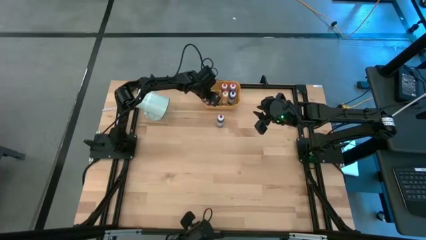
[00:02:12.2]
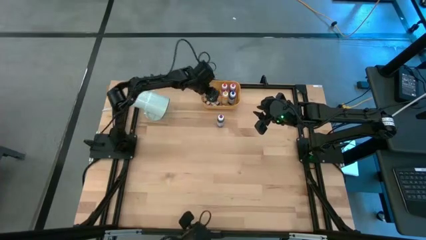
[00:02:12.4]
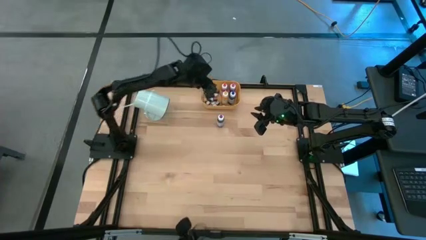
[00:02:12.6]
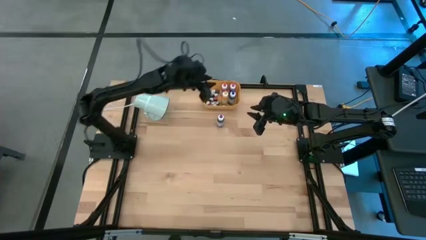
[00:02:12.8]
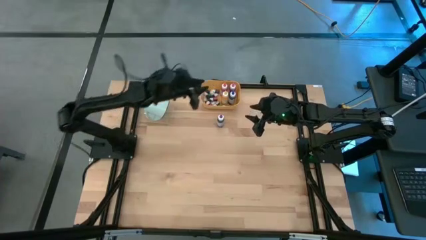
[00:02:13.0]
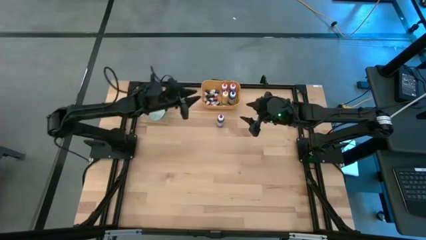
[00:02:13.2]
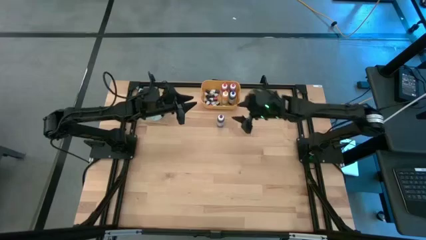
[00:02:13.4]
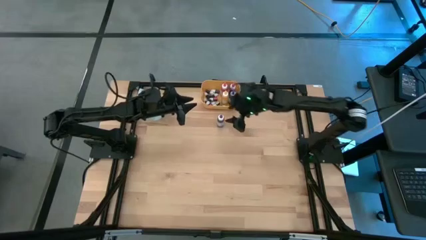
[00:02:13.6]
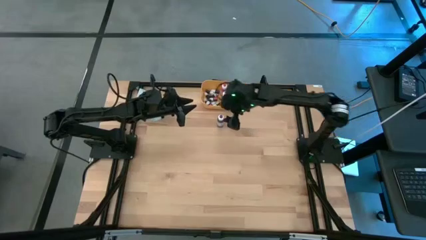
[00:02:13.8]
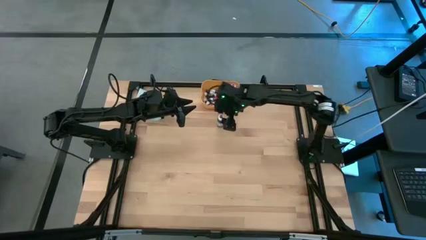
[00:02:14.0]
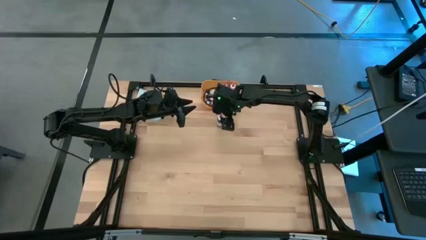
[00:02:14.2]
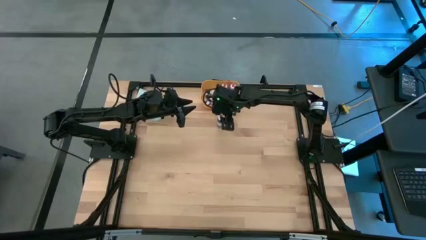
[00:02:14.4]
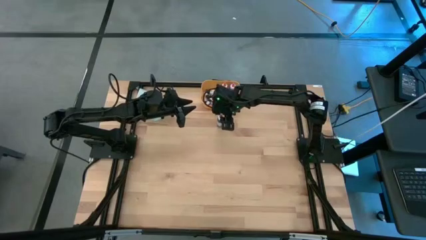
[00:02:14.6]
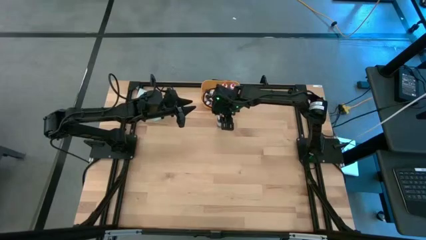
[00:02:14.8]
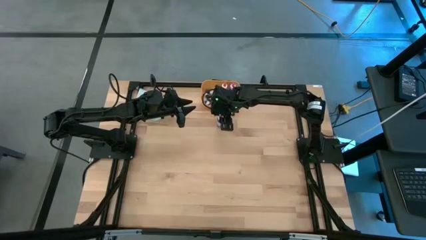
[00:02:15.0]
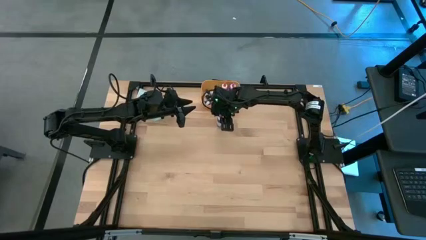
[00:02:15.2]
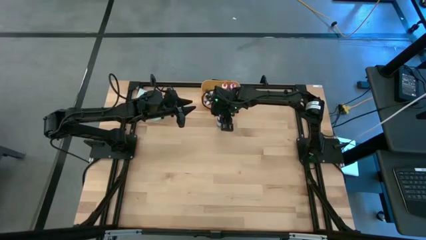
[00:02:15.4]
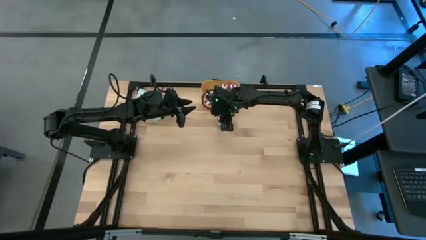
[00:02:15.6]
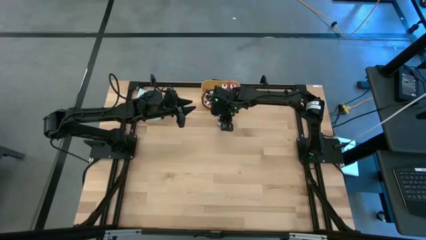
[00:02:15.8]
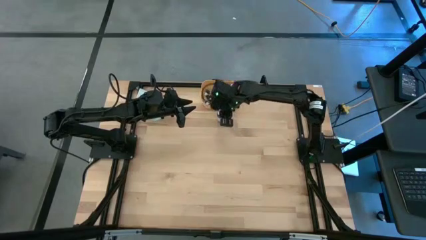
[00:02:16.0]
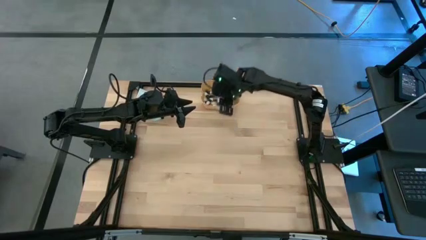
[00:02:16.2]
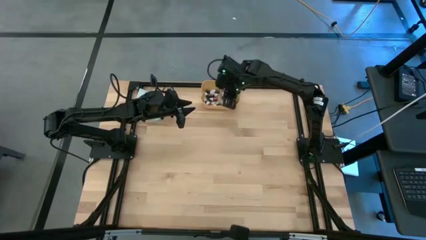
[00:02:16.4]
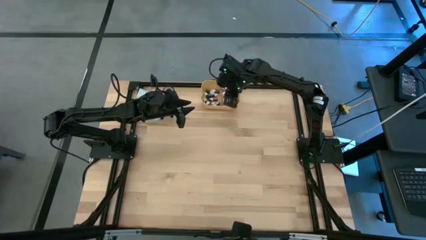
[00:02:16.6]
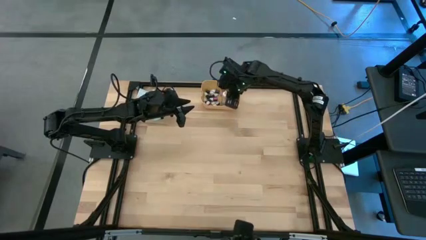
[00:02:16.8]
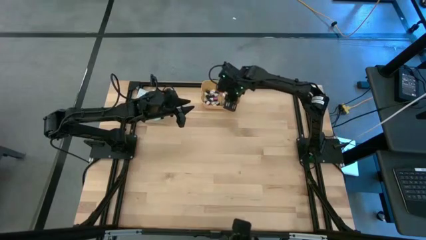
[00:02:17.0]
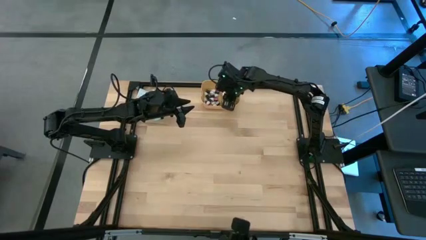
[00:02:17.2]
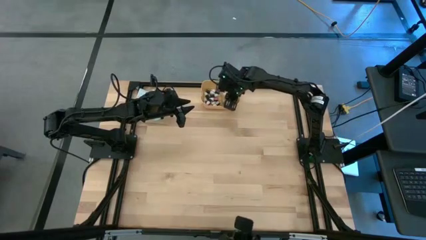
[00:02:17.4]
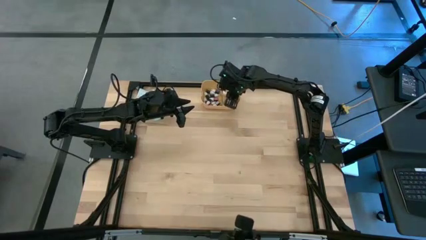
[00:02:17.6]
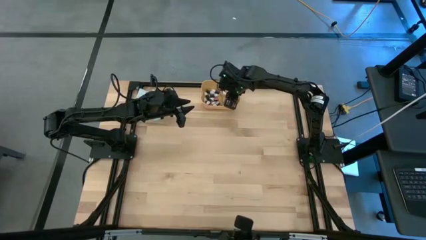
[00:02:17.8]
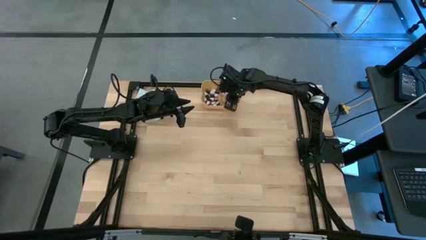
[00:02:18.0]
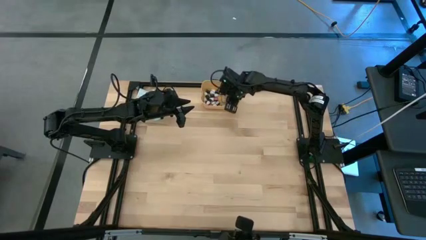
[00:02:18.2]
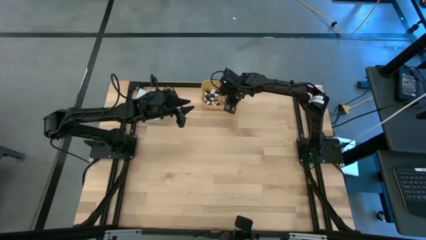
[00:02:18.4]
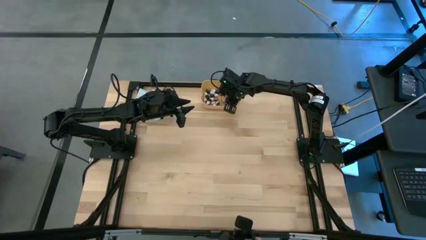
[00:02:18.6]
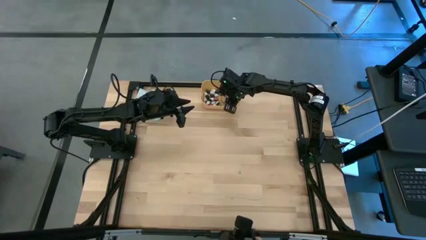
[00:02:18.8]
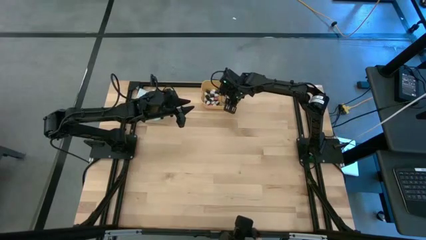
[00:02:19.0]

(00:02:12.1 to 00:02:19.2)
Task: Pick & Place food coloring
Put the violet food coloring bottle into the yellow bin

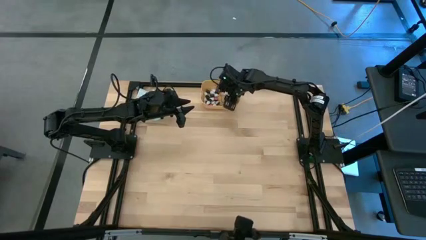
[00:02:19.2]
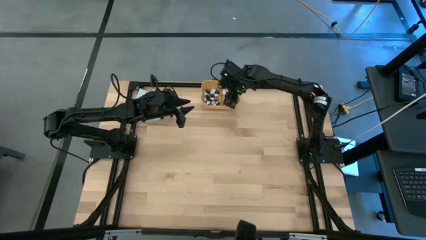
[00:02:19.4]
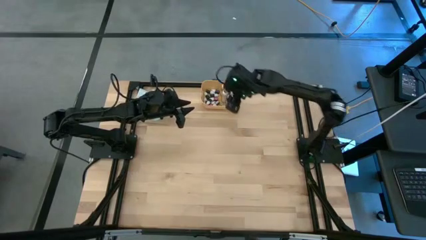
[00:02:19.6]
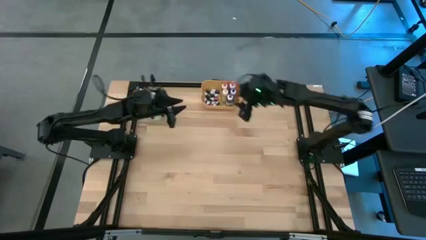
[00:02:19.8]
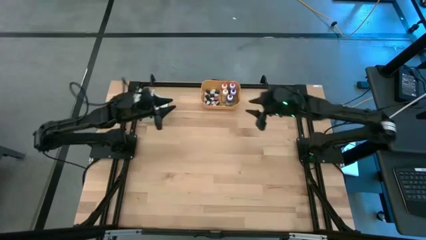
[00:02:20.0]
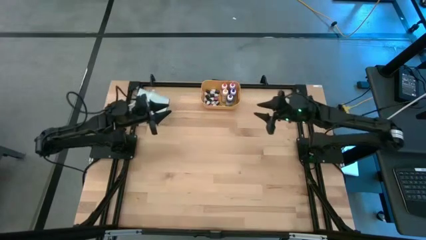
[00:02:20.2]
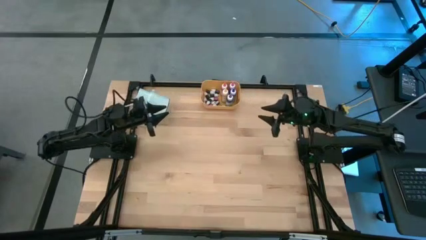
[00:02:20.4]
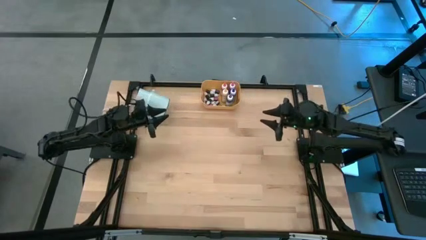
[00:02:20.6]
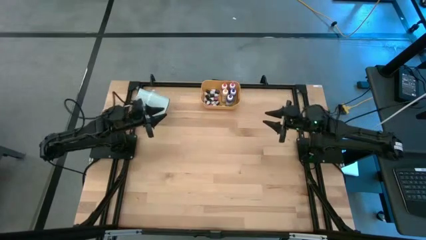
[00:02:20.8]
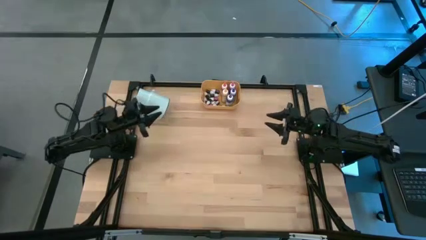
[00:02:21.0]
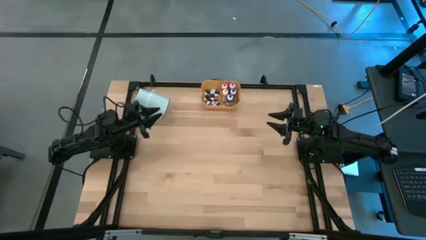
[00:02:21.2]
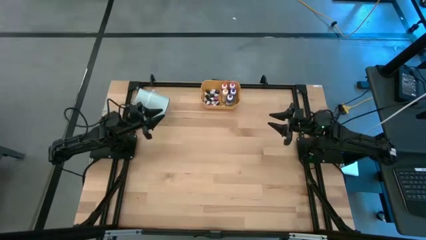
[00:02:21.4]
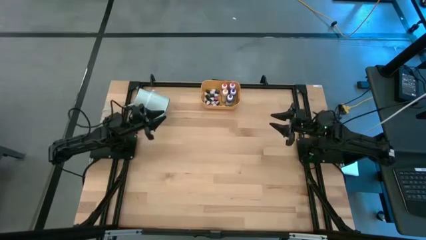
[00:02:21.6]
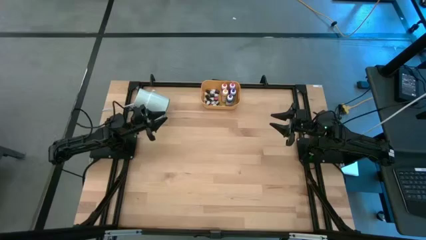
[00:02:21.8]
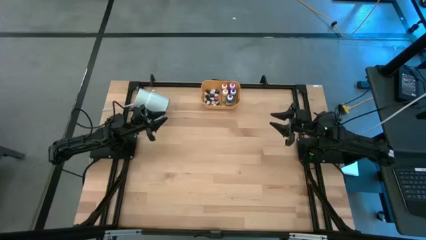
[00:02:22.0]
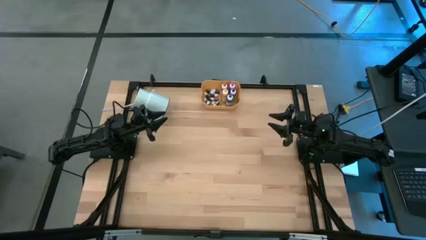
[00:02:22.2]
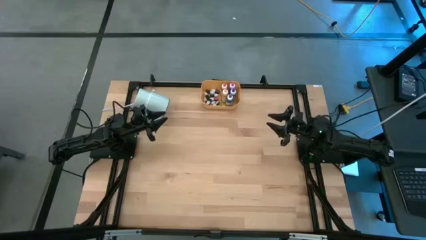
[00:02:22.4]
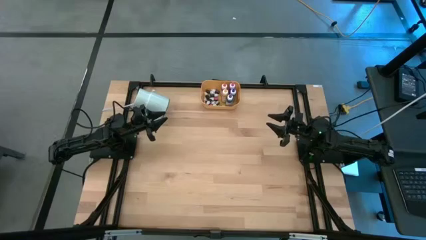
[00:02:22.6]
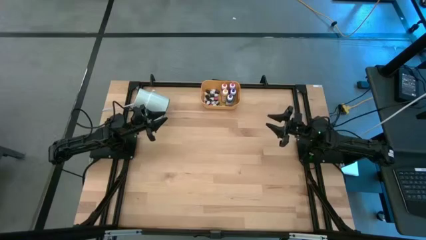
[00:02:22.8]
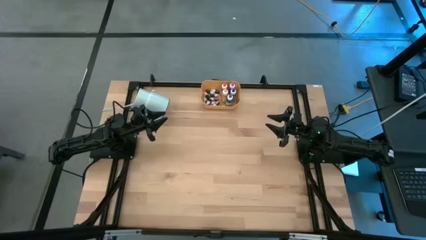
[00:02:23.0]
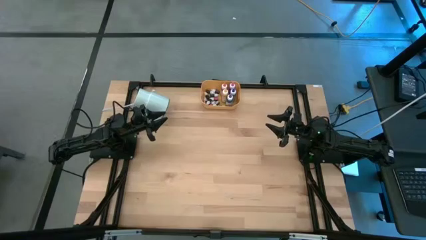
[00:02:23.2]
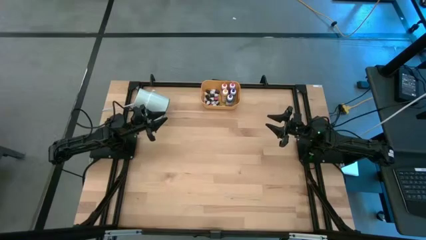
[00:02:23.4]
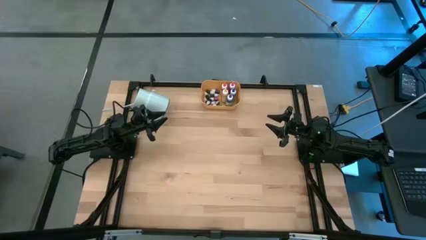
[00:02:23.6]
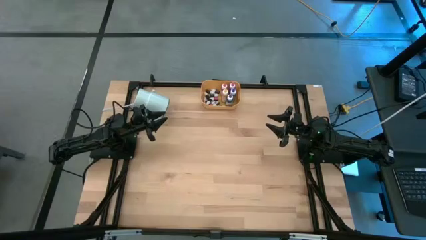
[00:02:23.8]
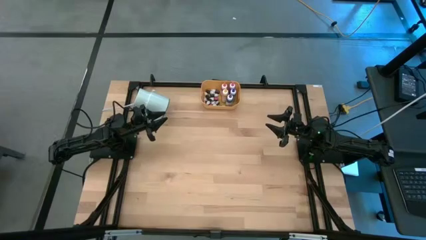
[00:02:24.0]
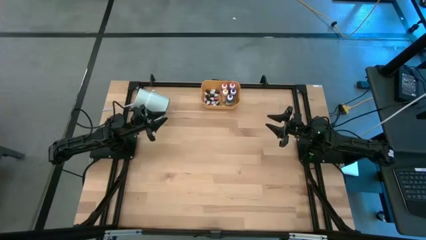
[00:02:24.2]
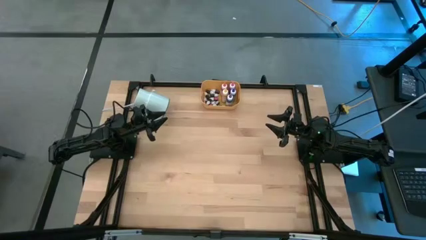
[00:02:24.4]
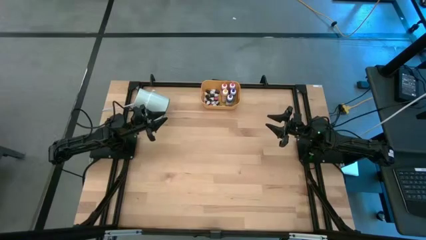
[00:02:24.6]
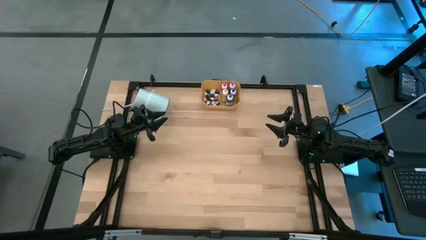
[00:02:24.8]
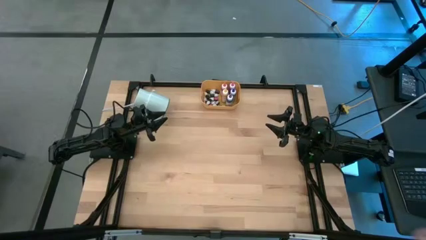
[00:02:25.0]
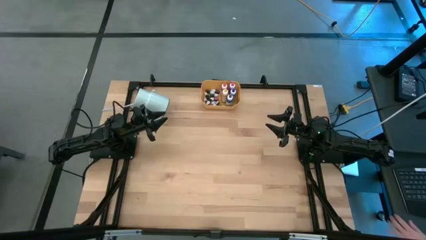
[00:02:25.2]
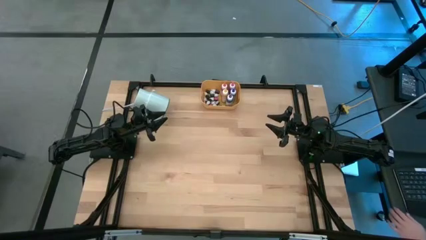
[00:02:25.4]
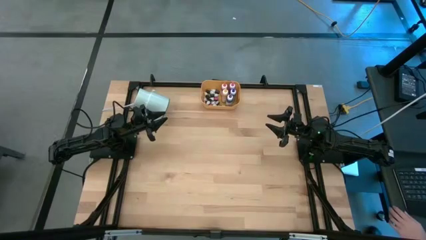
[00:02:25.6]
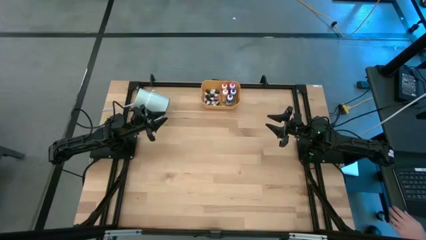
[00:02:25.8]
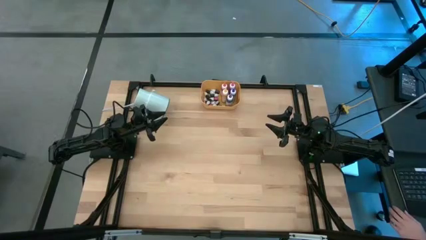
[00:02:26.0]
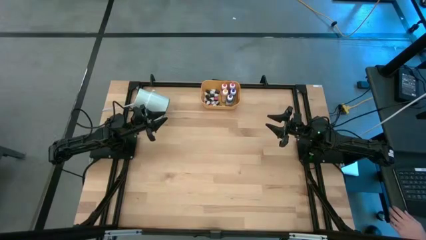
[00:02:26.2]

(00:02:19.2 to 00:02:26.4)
Return to Home Position

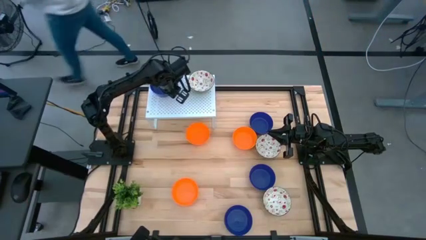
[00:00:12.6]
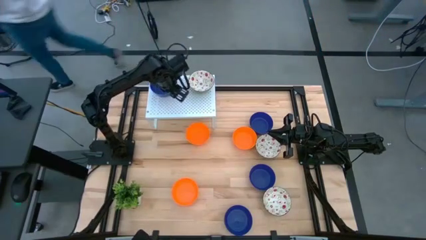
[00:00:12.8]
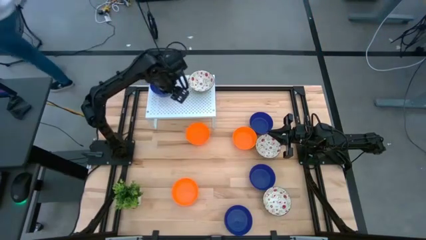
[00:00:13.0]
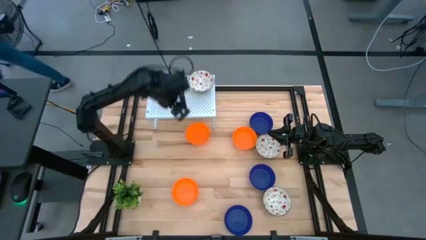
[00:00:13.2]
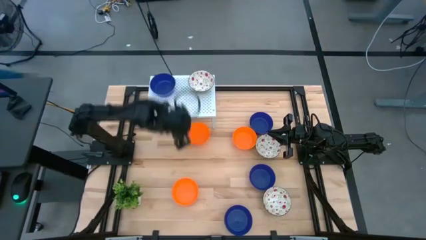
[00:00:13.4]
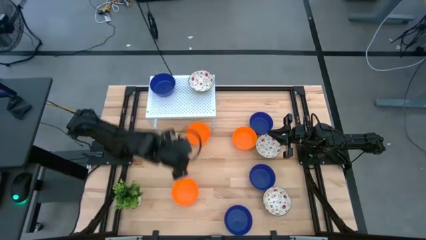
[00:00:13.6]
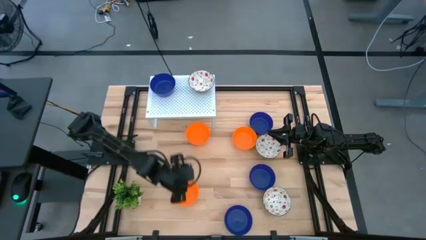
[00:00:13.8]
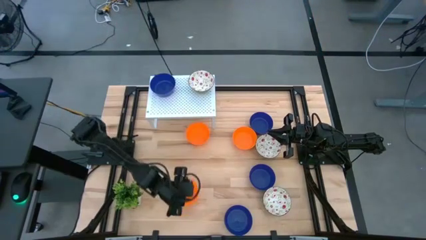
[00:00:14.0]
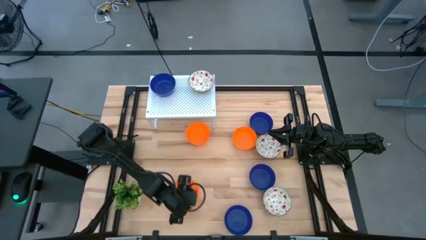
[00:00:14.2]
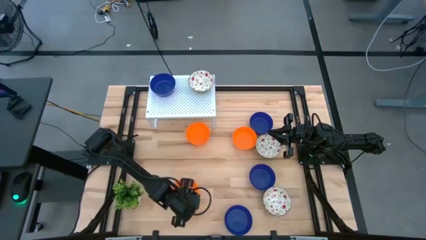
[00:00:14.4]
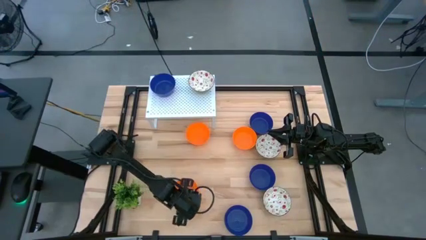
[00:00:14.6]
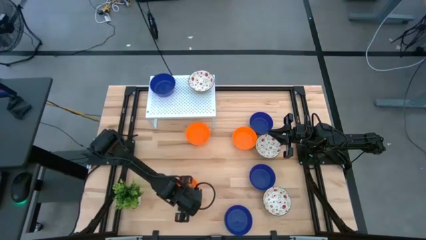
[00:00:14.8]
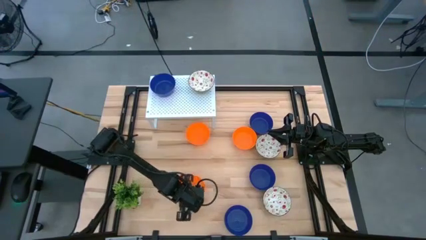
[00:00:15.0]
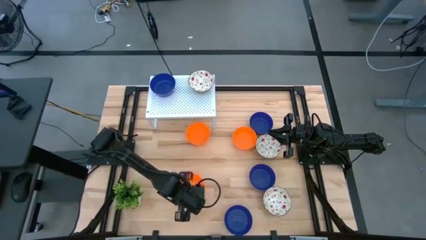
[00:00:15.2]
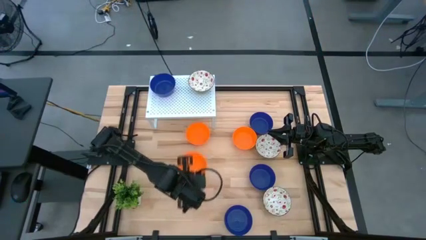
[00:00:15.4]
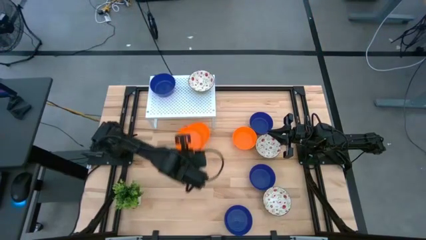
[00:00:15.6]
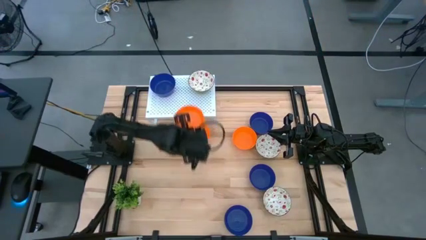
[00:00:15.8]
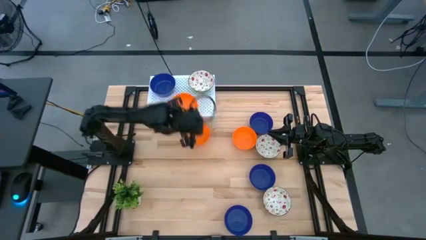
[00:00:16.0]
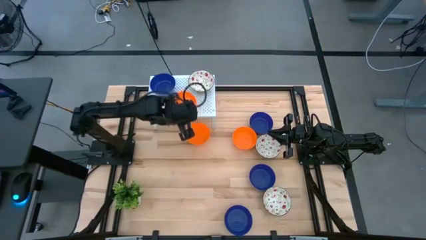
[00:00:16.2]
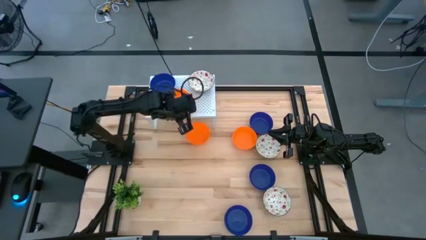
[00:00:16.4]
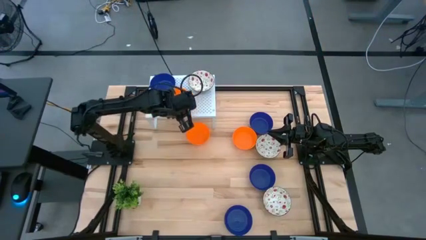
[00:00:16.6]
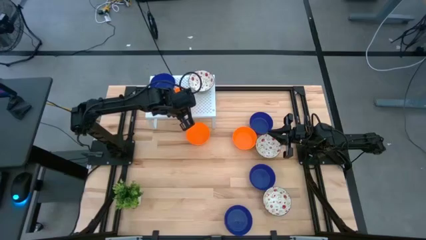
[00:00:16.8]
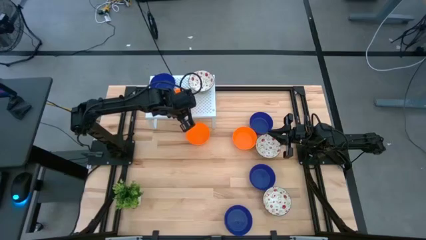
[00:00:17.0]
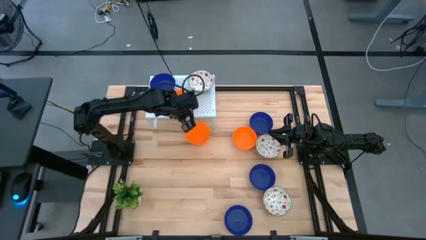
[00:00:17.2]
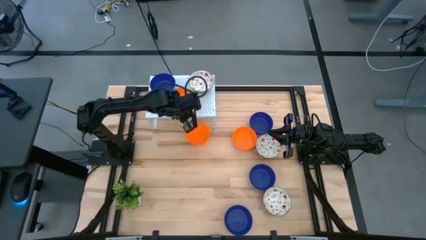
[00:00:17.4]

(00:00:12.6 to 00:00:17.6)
Task: Pick & Place Mini bowls
Put the orange bowl on the shelf
